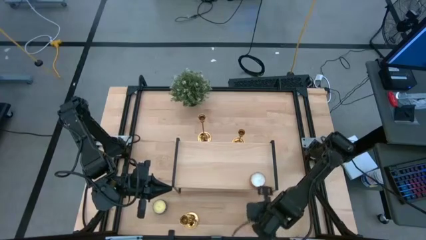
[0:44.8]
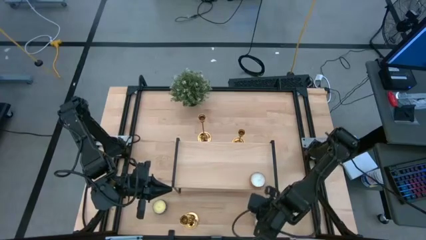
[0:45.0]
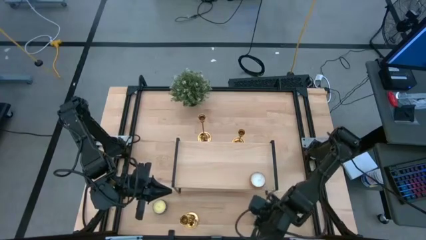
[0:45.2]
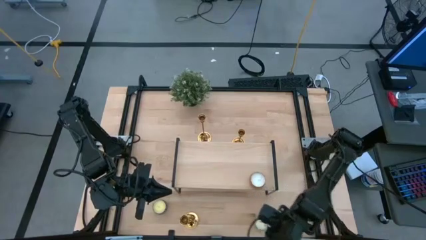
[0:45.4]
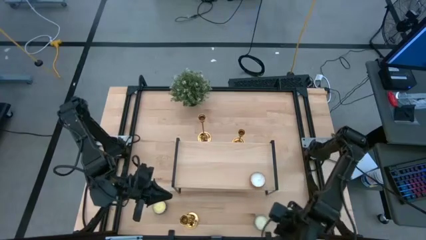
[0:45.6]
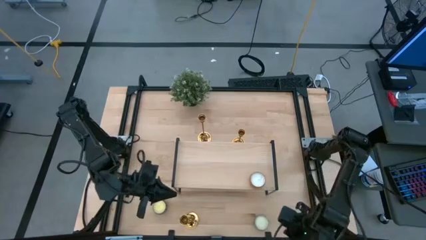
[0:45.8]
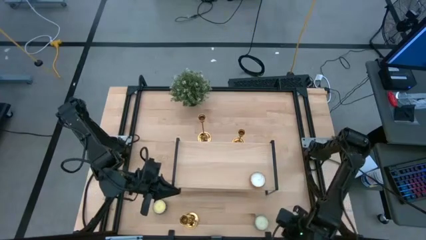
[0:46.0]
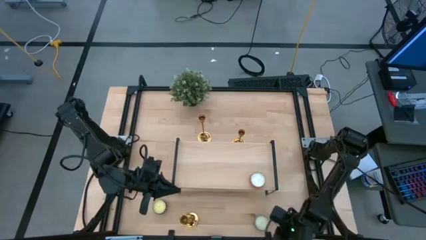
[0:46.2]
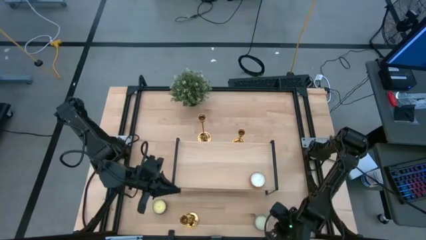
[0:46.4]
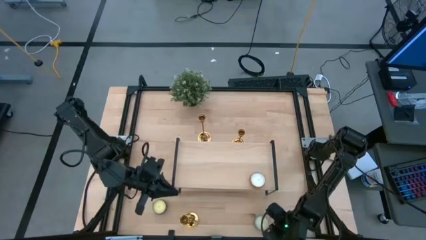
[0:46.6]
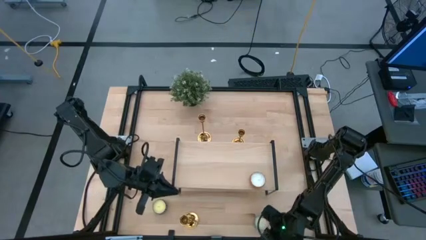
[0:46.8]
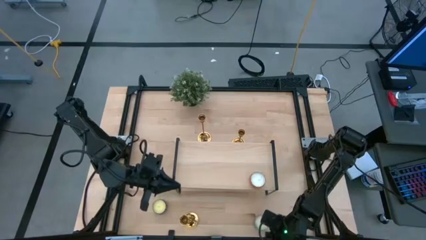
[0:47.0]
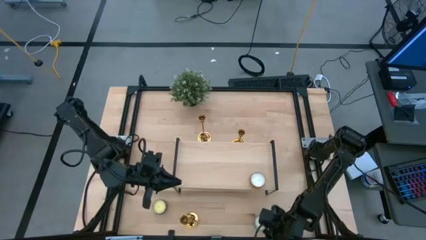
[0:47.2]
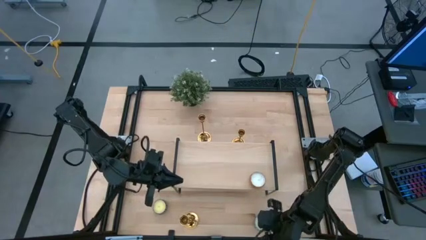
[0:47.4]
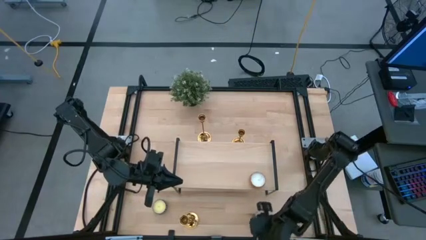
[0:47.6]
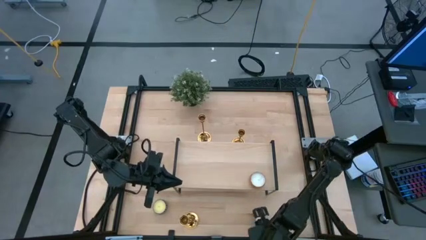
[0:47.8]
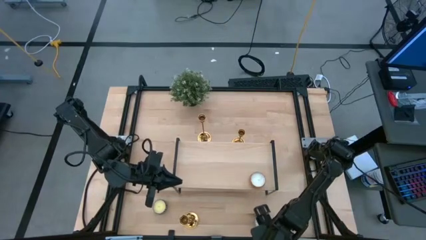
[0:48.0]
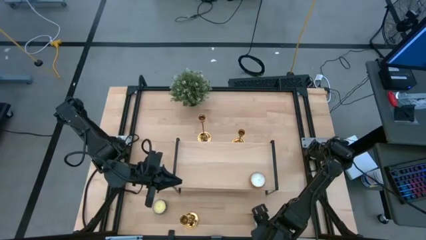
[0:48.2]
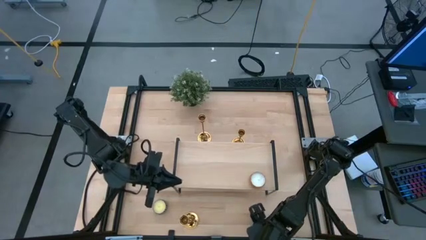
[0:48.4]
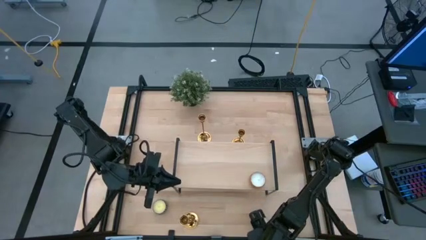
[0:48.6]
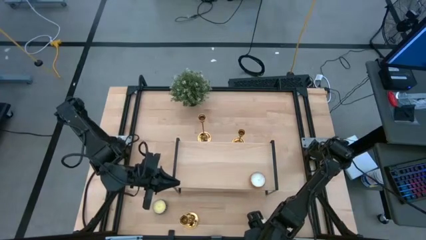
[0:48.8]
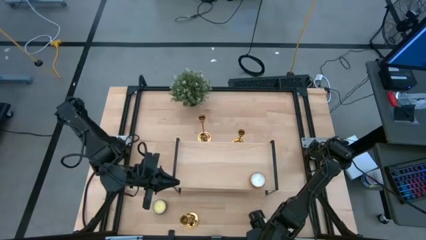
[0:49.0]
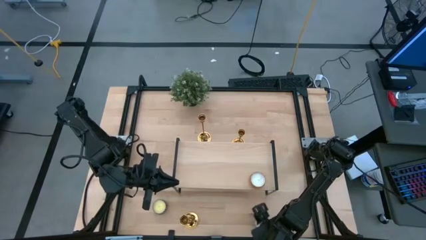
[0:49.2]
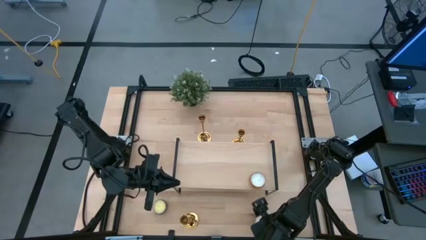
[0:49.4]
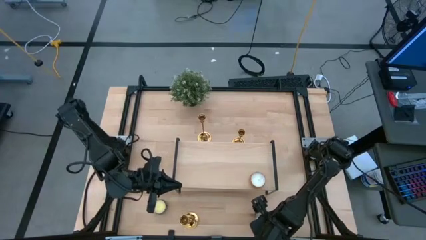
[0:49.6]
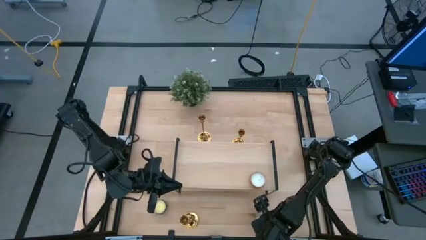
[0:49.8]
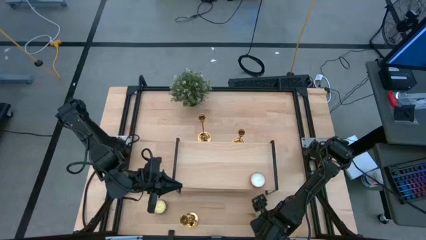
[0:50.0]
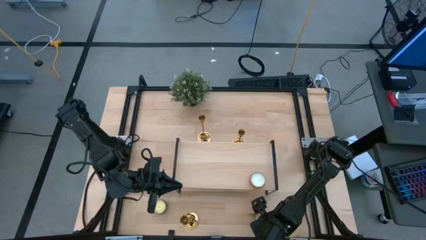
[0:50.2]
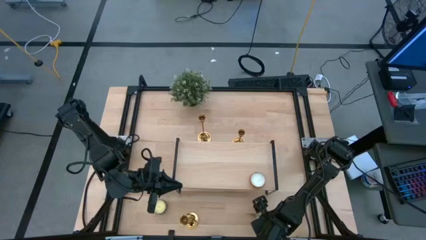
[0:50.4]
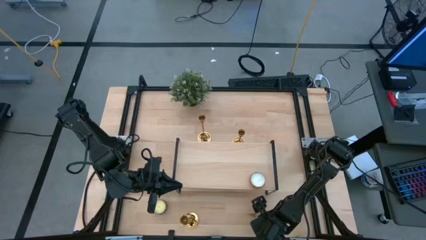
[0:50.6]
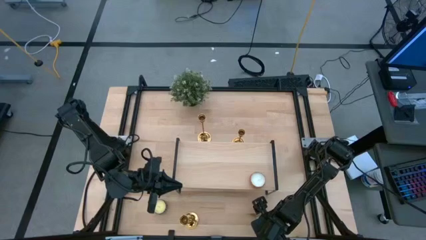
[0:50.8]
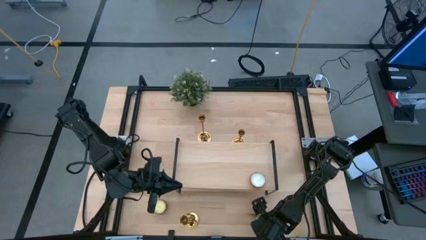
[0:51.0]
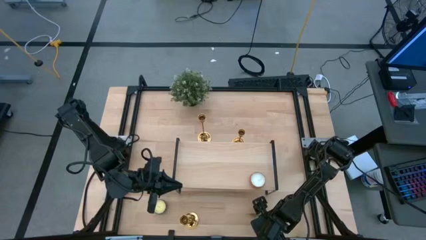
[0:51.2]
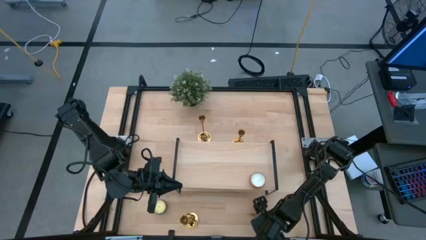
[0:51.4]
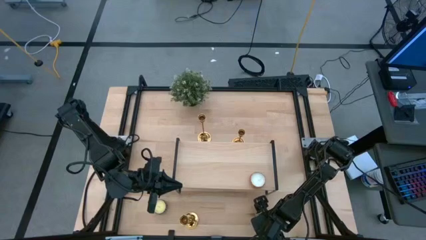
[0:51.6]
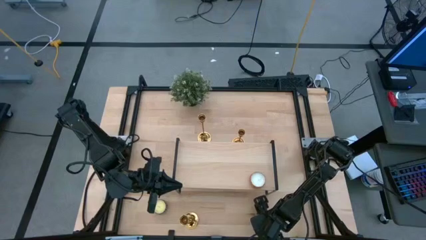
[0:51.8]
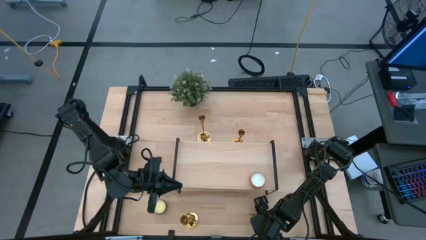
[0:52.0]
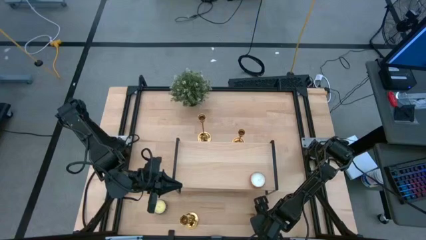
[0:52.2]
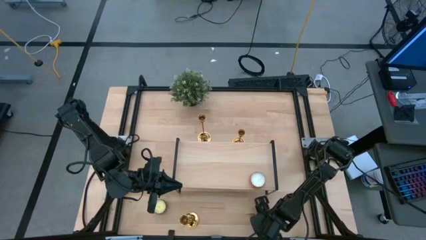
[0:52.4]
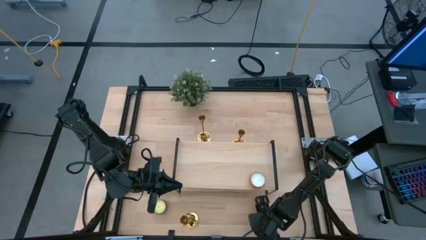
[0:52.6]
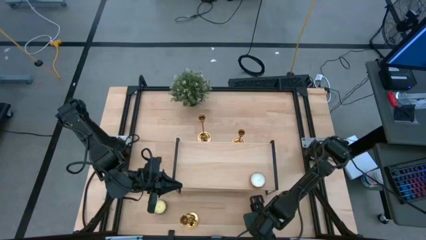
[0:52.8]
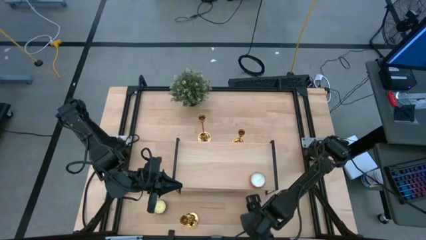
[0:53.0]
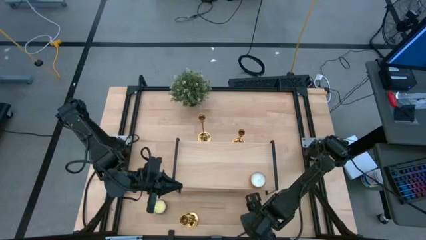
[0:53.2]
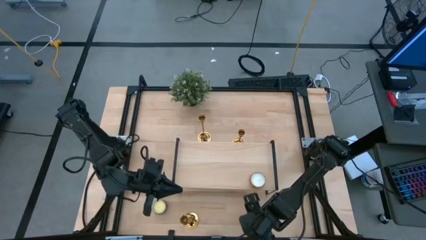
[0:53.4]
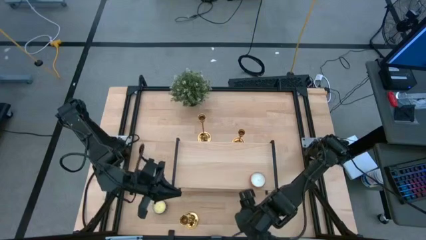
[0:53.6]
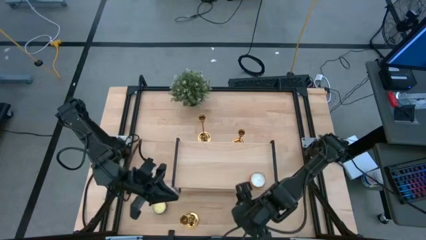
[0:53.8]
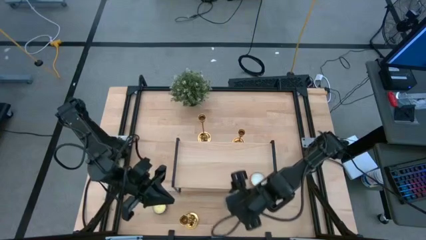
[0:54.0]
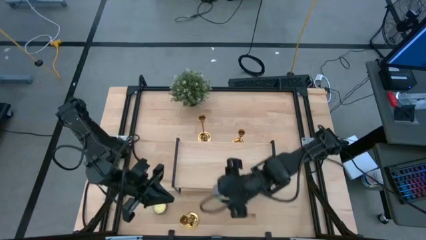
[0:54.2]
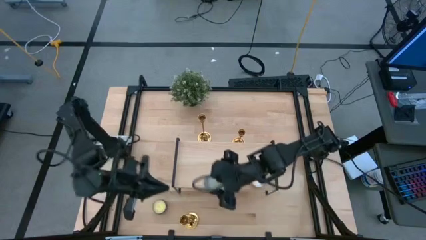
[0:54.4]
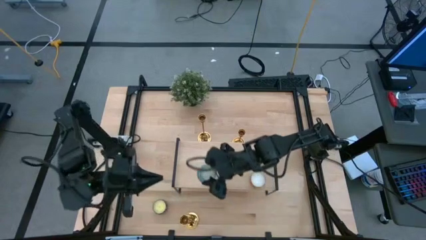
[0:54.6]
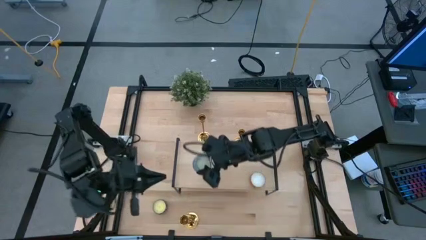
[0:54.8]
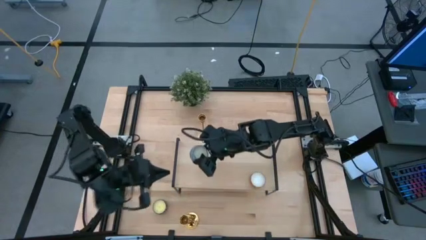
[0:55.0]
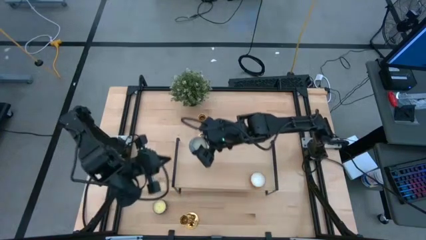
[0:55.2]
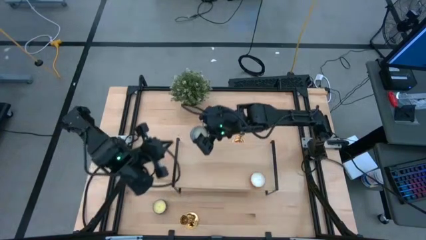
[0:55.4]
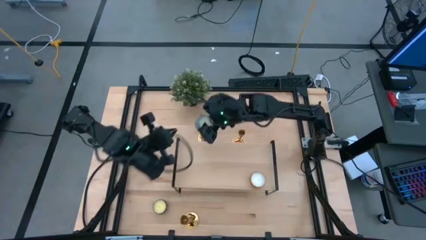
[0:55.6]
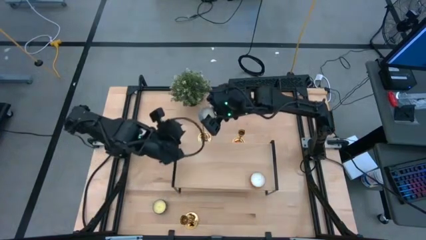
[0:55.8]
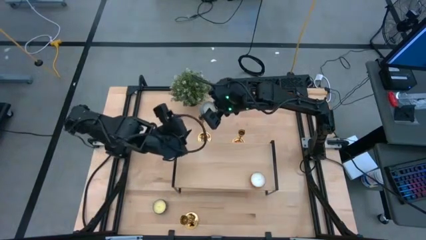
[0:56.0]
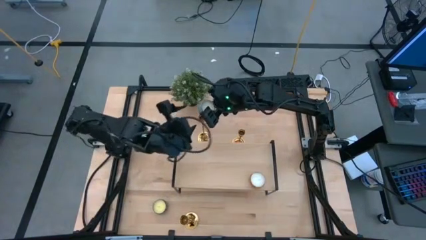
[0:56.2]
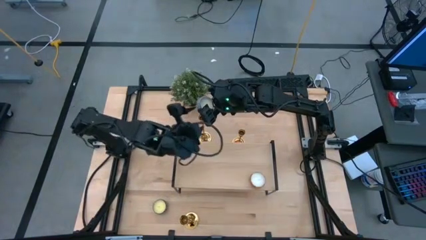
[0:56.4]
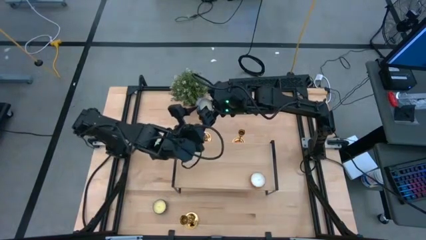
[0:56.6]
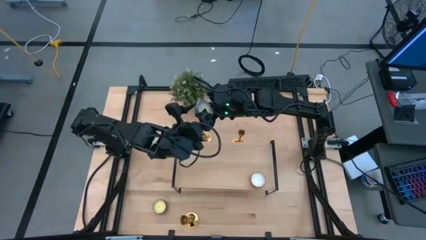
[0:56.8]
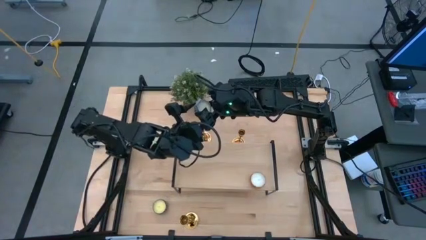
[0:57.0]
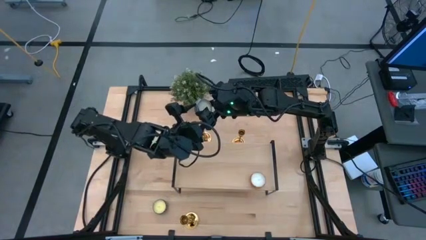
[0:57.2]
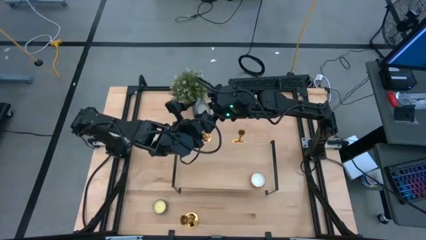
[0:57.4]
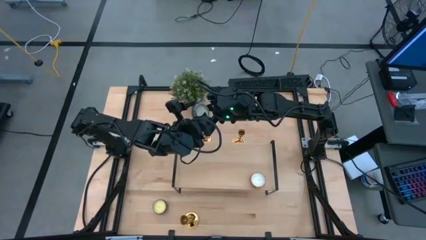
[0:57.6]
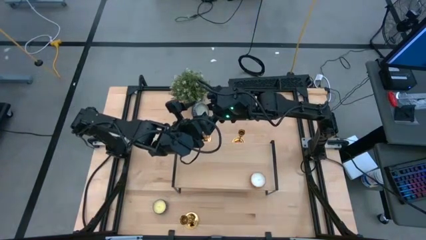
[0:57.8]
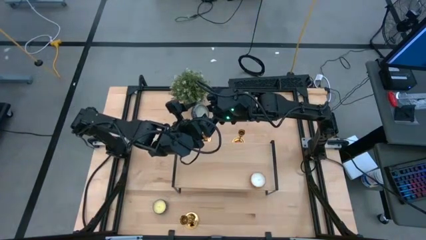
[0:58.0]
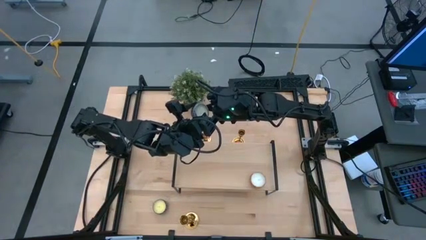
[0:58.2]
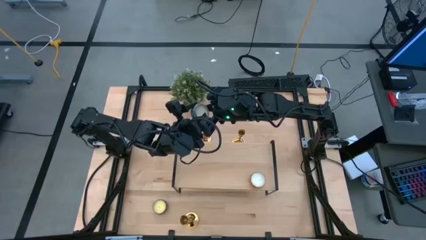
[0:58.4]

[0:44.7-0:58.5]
Task: Pick & Place candle stick holders
Put the blue scented candle on the shelf aligned with the orange scented candle

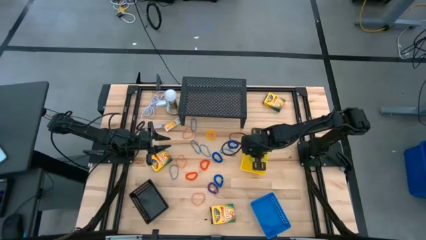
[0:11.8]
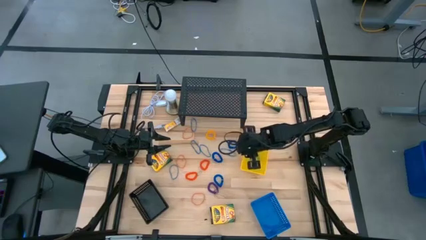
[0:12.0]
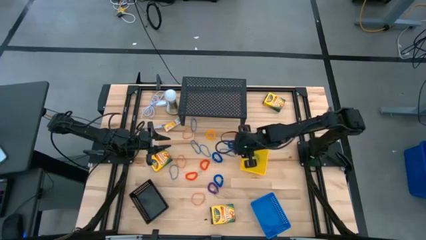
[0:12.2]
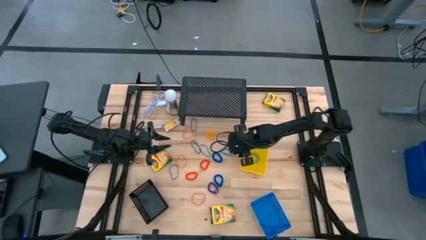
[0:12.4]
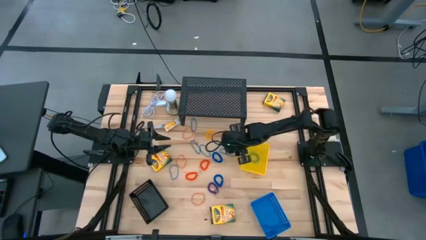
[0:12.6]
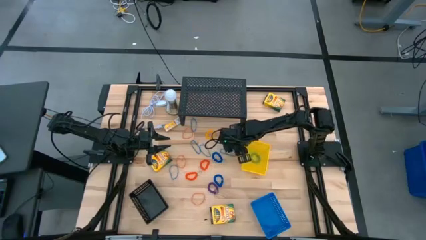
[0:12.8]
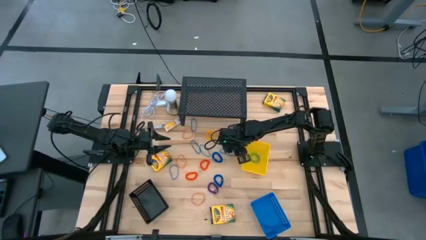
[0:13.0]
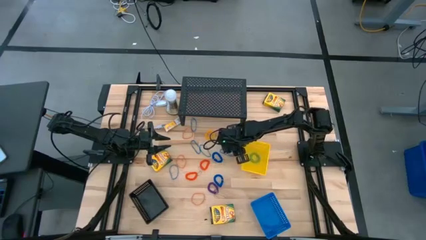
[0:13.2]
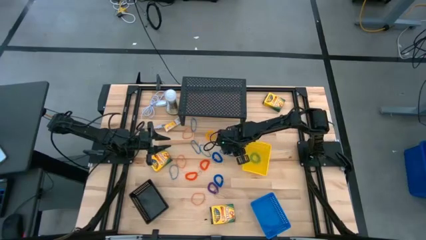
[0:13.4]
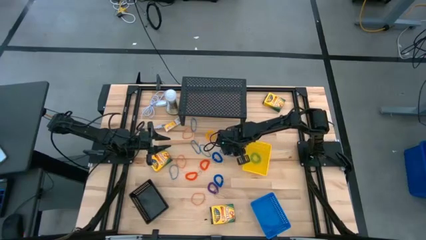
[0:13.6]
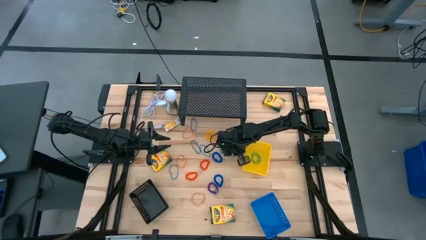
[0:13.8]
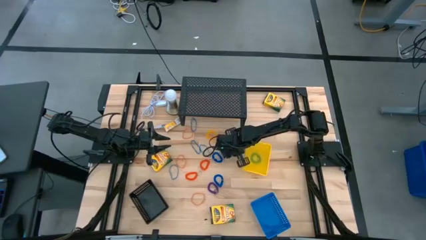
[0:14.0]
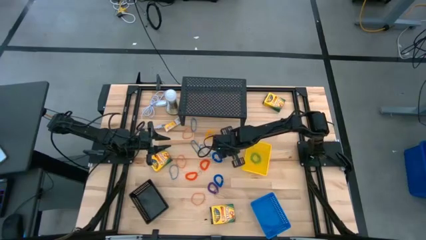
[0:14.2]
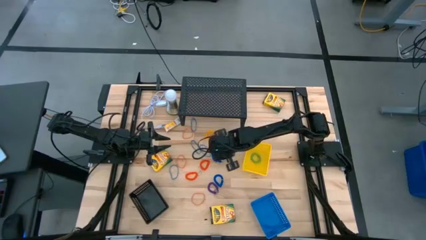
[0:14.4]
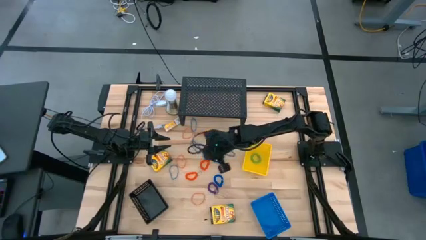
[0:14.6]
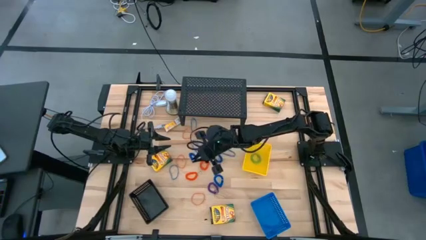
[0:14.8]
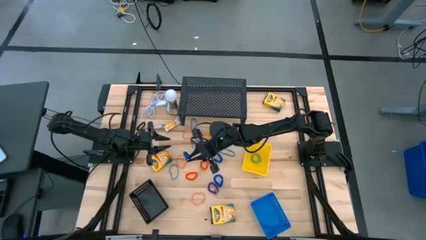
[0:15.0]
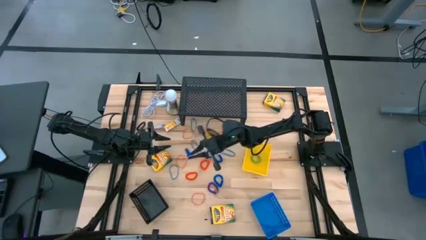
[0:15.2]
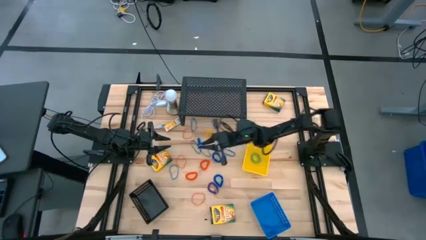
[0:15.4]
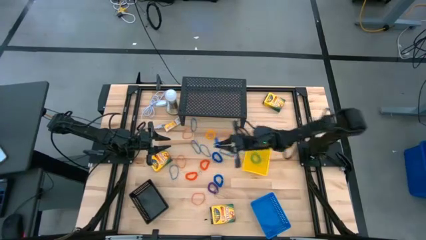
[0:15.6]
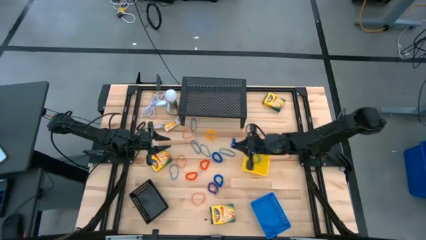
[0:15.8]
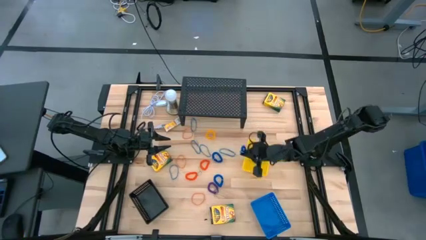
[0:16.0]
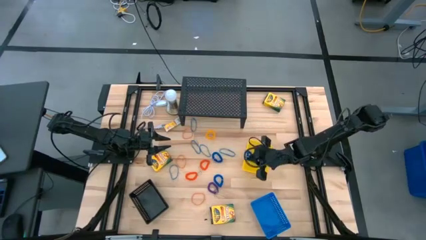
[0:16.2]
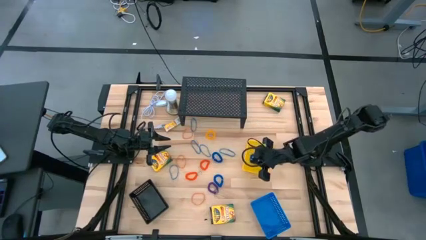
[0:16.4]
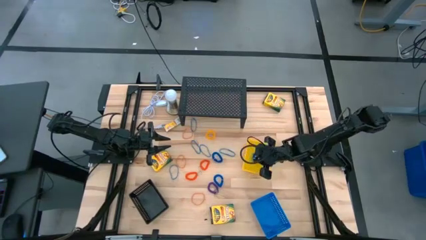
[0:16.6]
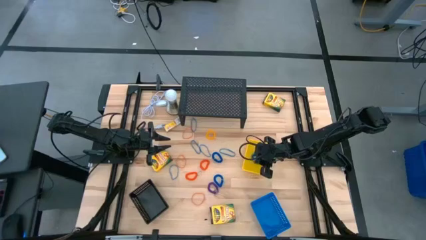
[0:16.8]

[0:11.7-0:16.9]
Task: Pick & Place Office Desk Supplies
Put the blue spring keychain into the yellow basket
